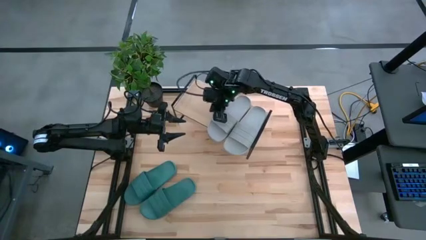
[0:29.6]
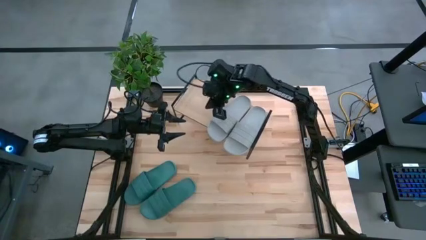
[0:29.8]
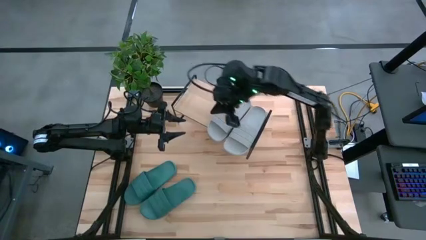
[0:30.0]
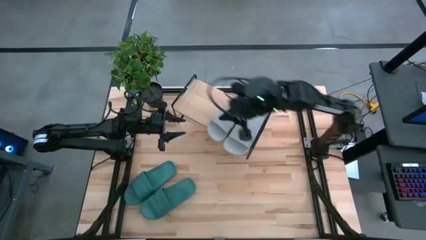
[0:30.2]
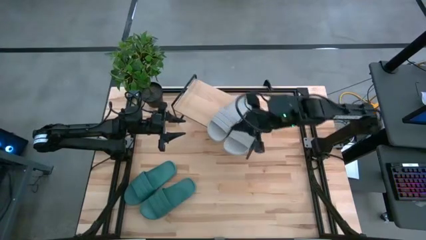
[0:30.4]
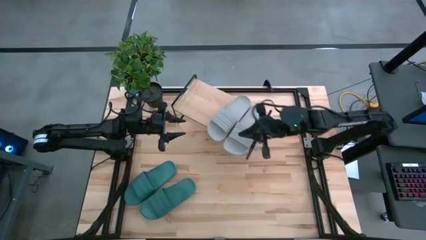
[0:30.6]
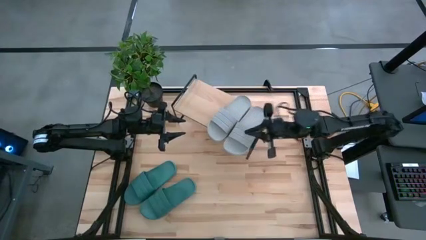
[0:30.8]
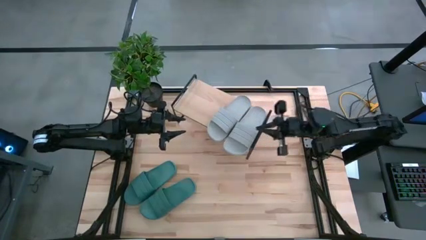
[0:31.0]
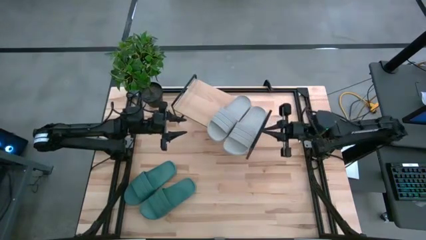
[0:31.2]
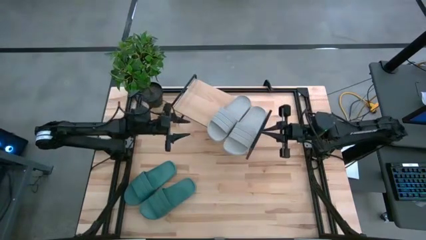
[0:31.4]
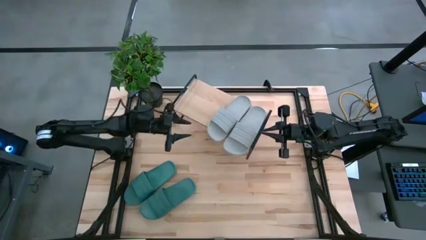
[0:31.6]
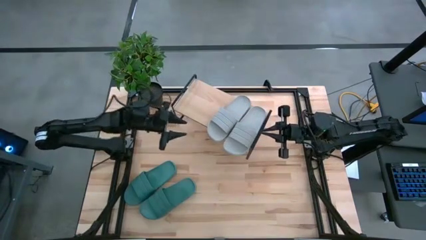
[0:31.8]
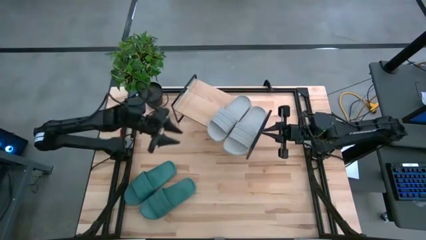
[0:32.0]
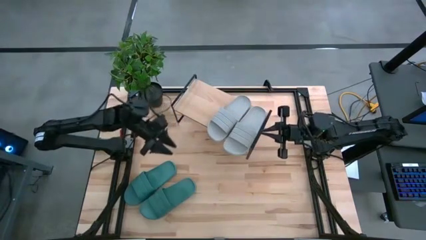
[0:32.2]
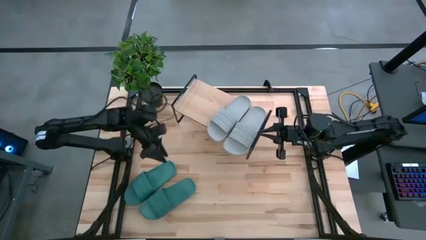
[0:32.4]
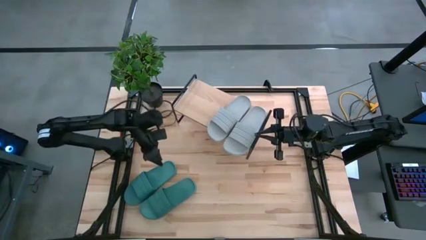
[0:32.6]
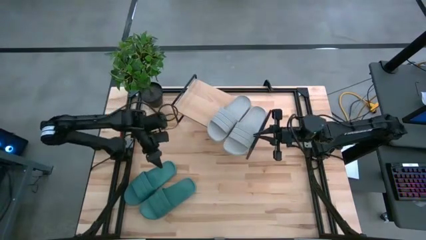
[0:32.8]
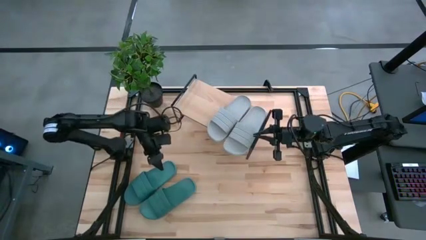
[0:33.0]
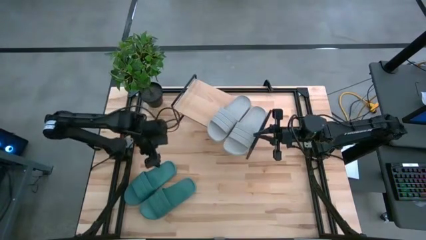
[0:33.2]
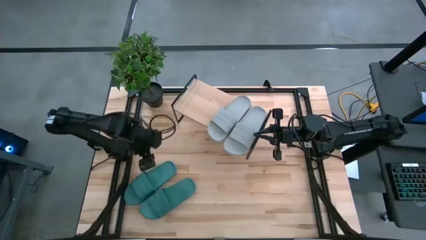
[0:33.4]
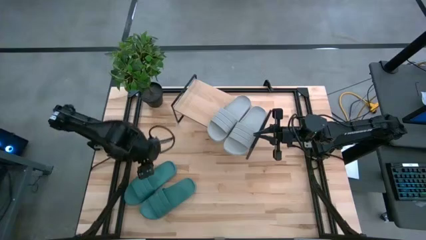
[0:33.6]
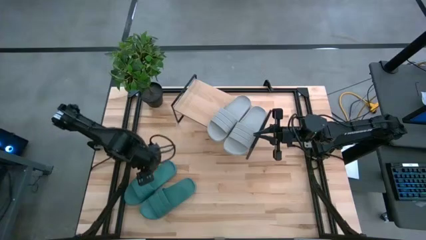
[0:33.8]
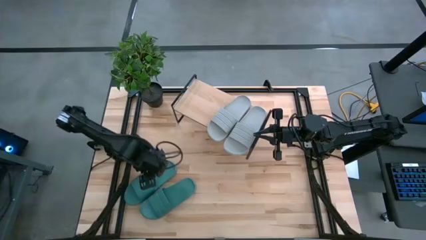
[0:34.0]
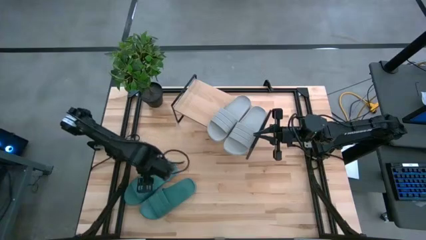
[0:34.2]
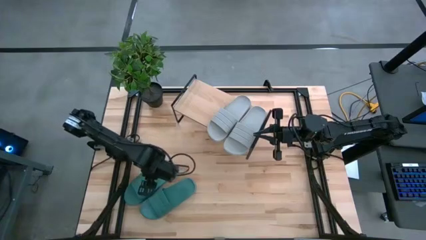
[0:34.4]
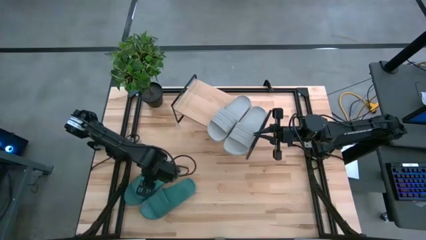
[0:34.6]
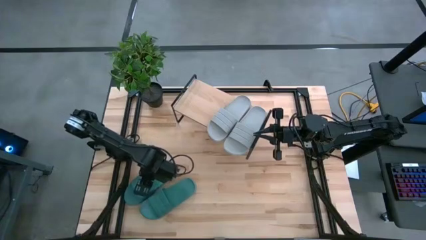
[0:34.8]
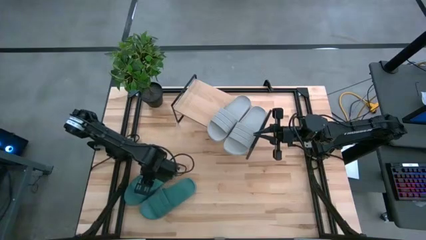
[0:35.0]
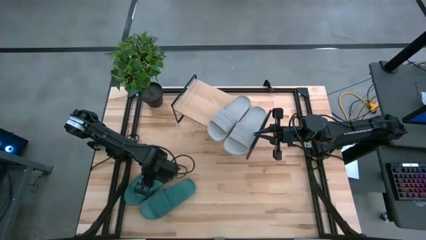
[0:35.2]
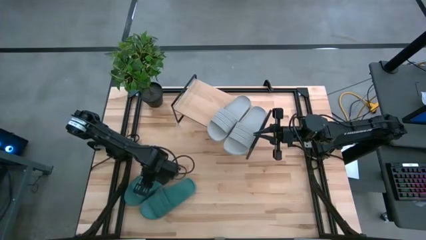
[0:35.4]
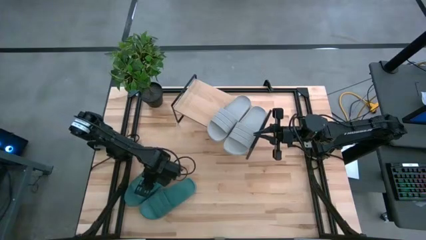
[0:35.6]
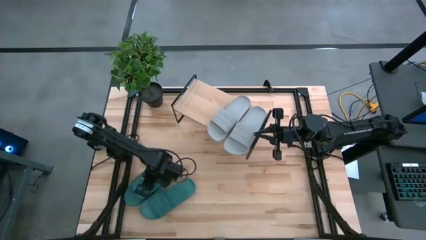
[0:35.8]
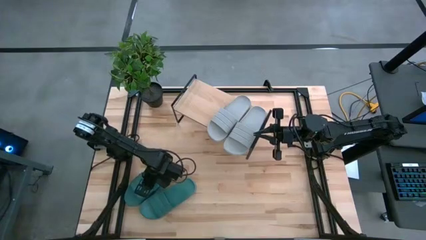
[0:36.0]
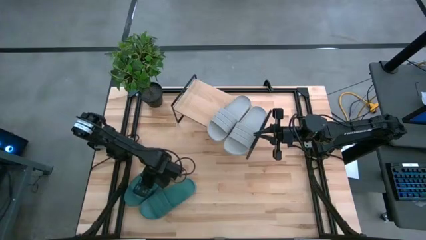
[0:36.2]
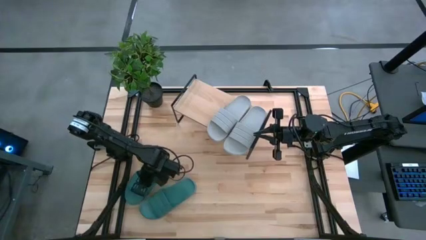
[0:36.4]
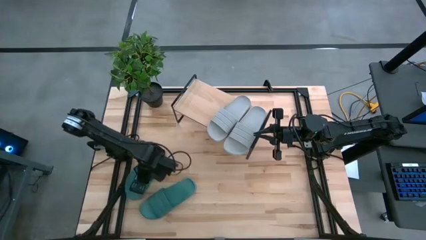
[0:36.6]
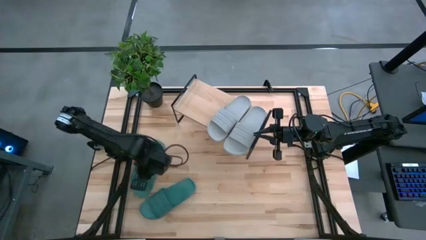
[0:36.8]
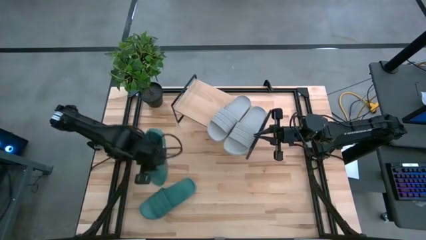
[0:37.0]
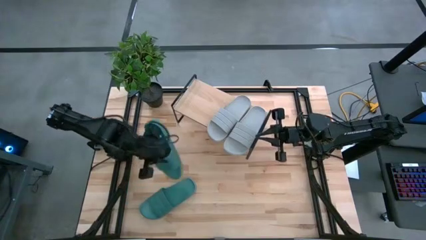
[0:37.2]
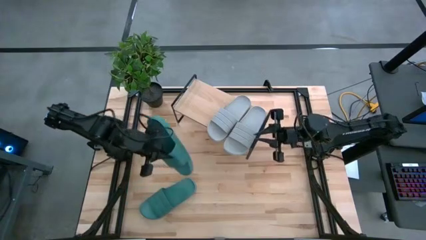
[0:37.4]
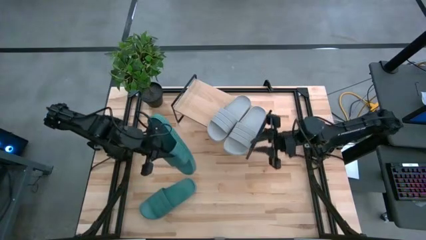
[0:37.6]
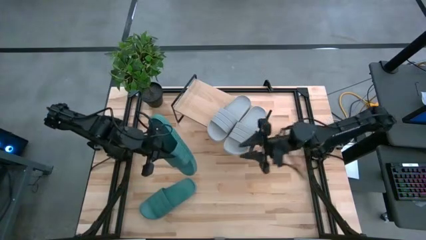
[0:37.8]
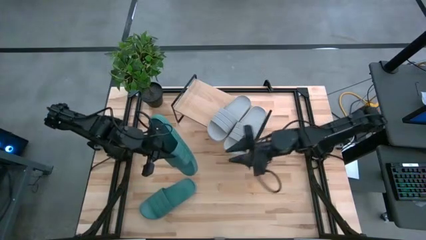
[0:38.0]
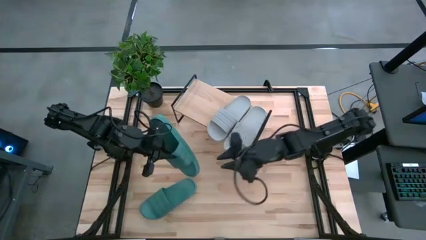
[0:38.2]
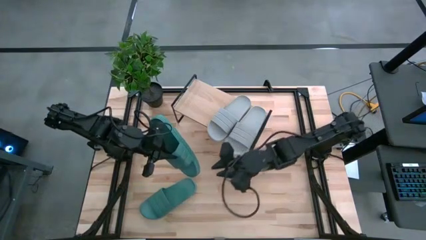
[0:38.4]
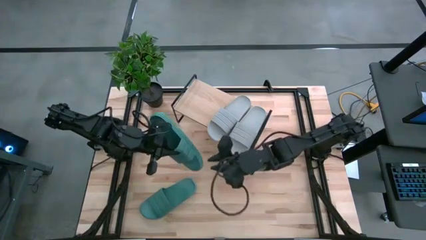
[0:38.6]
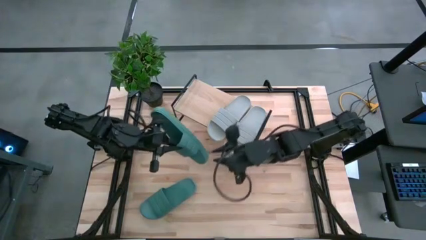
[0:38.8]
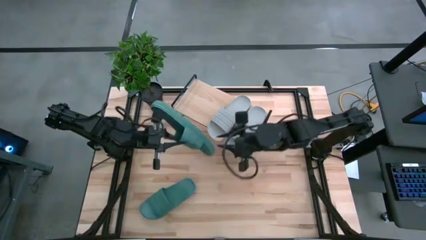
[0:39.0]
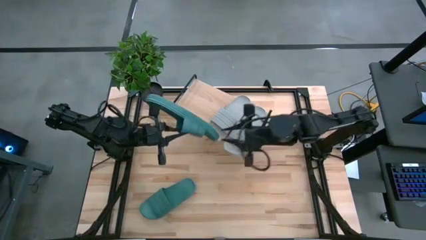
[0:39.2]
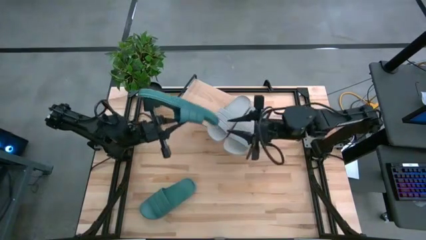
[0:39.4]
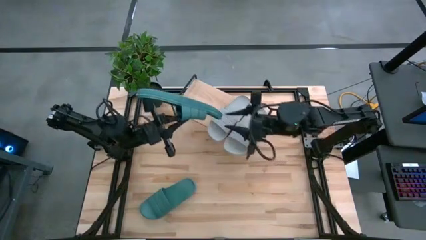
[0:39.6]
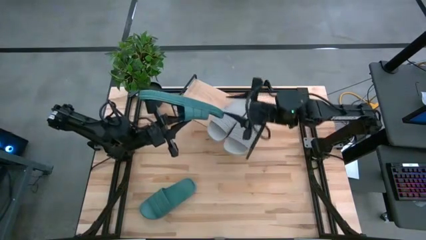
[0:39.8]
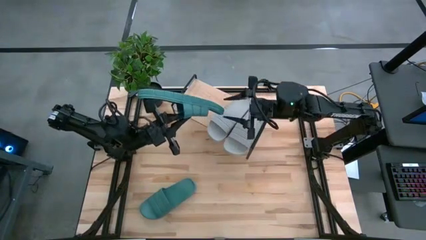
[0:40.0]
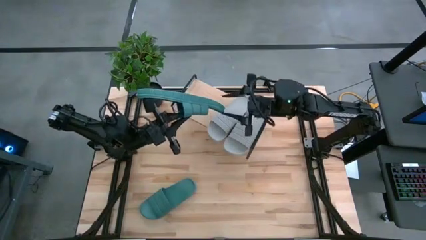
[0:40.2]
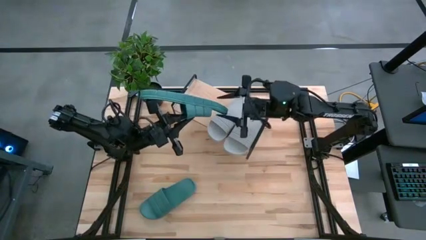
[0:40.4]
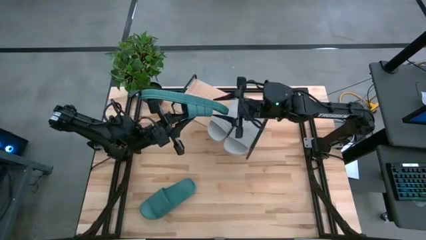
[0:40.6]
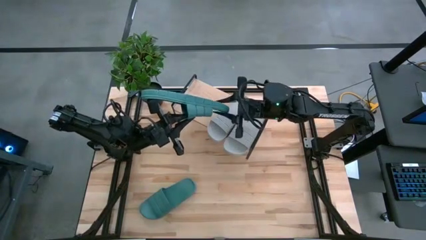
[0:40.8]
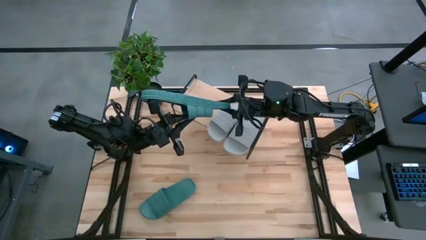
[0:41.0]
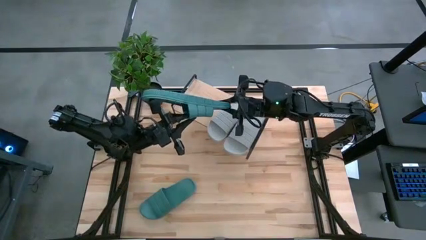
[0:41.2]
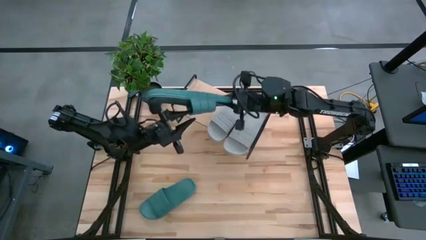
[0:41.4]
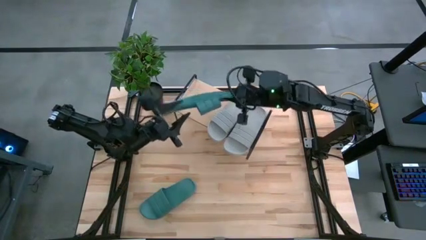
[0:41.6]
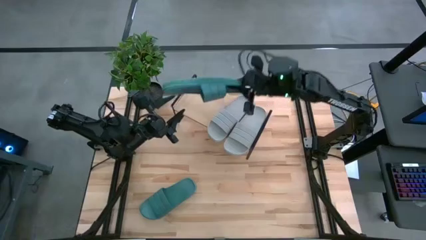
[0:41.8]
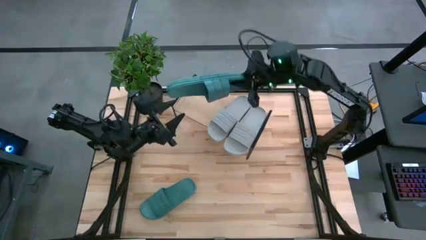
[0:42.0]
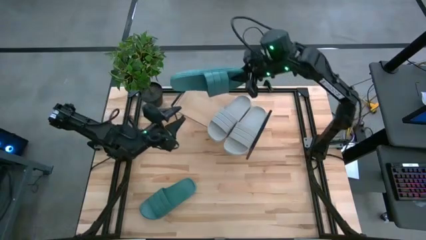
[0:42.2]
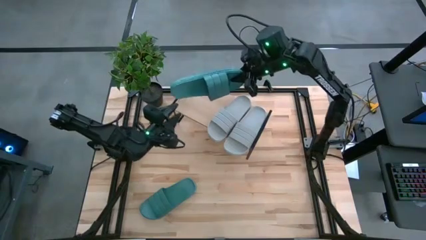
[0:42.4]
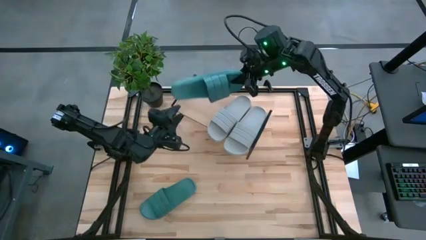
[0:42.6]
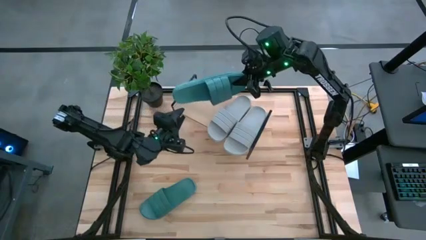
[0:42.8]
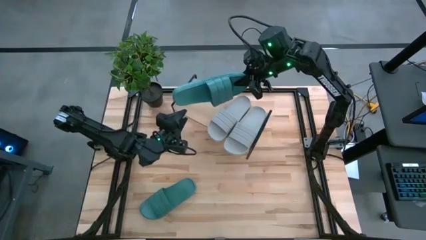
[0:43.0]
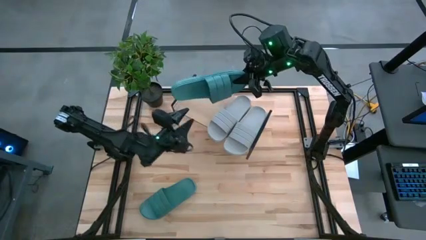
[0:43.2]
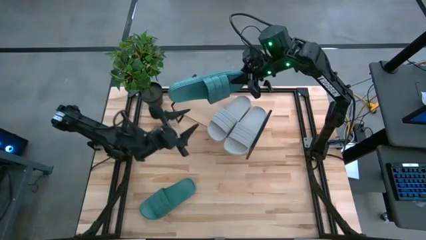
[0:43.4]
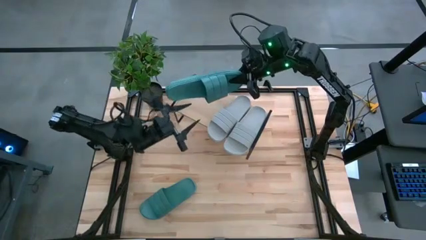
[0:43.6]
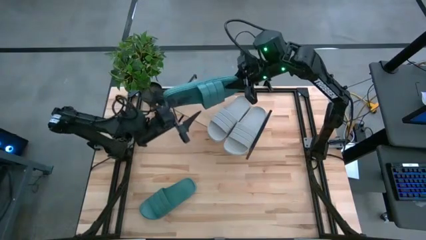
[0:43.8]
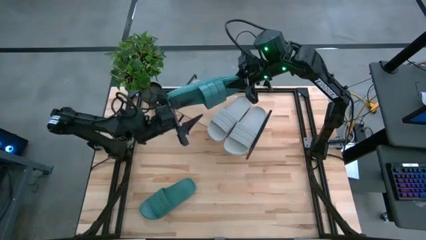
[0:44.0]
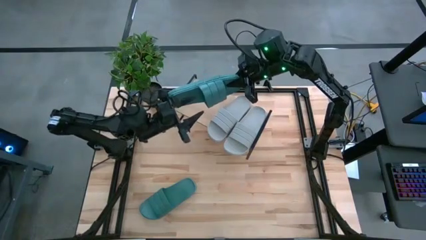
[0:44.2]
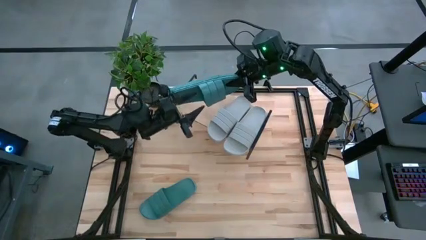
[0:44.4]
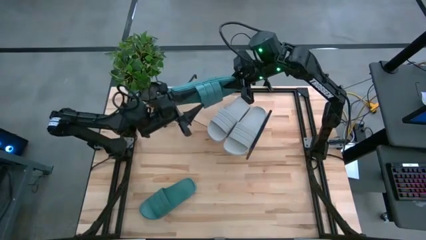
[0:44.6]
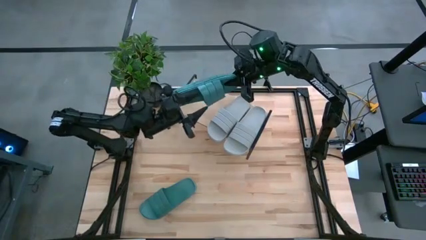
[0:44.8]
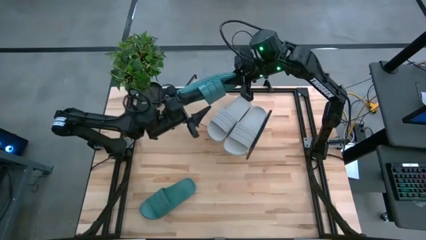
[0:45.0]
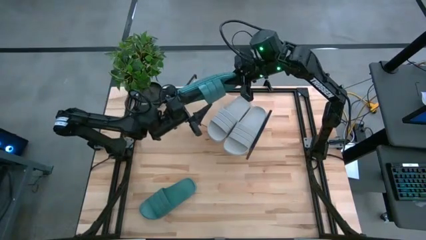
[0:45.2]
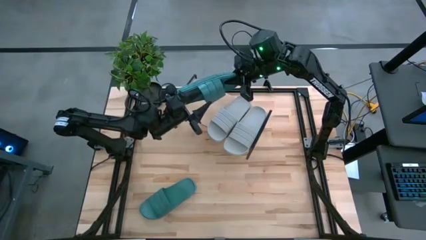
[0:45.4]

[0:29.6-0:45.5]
Task: Pick and place slides into the shelf
Put the top green slide on the shelf
